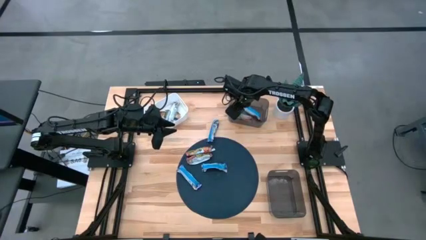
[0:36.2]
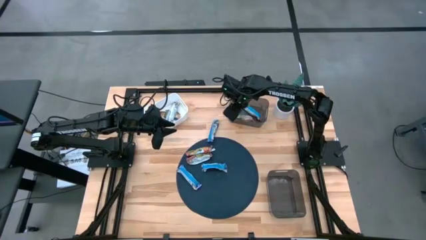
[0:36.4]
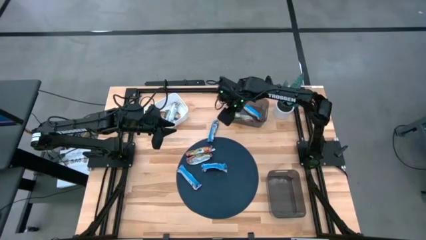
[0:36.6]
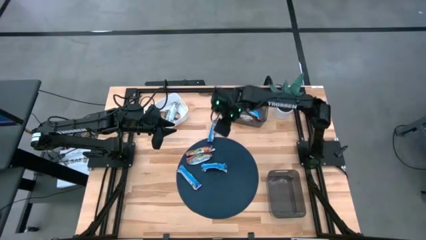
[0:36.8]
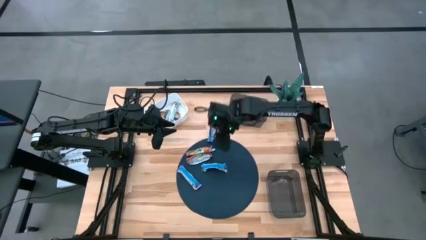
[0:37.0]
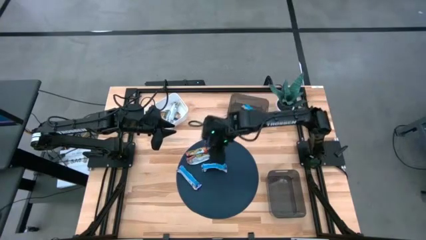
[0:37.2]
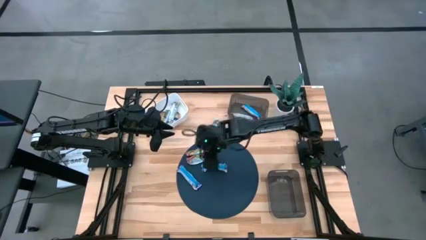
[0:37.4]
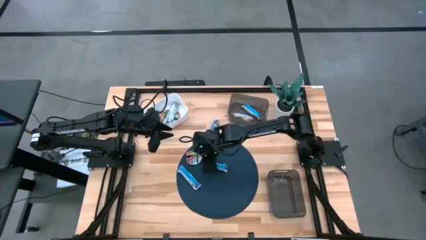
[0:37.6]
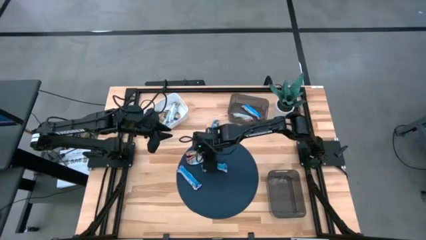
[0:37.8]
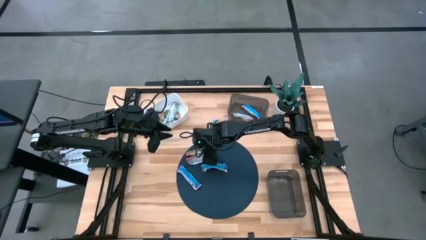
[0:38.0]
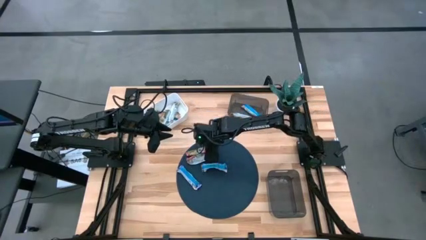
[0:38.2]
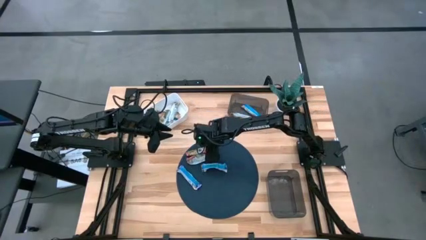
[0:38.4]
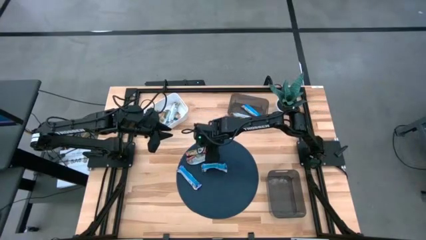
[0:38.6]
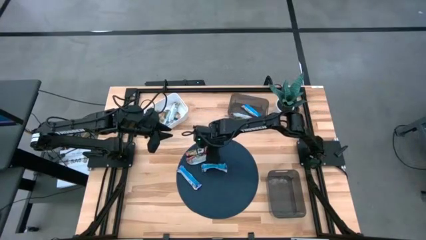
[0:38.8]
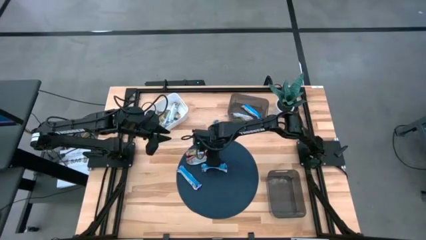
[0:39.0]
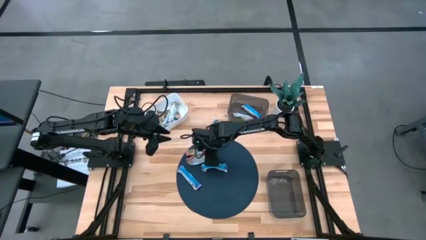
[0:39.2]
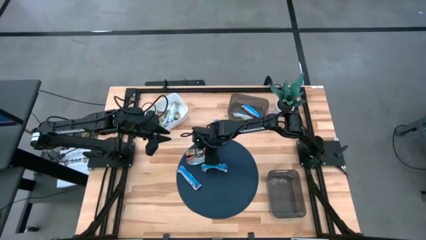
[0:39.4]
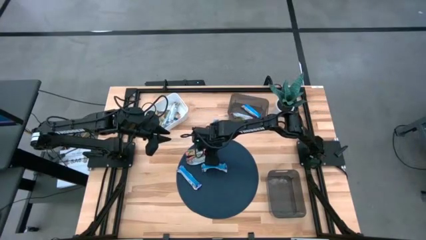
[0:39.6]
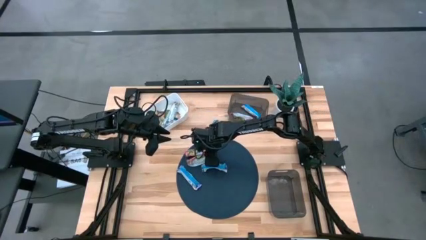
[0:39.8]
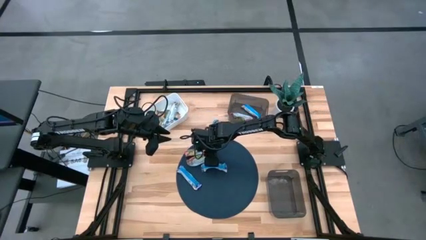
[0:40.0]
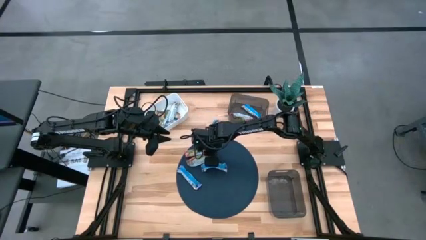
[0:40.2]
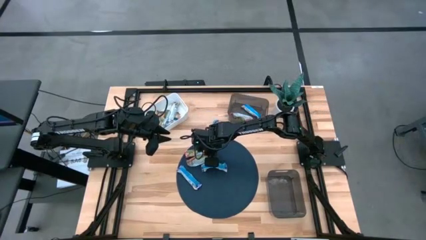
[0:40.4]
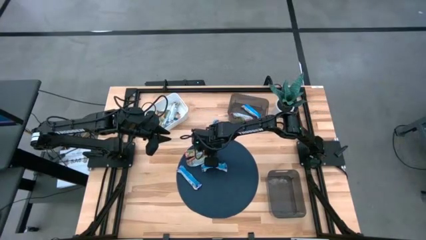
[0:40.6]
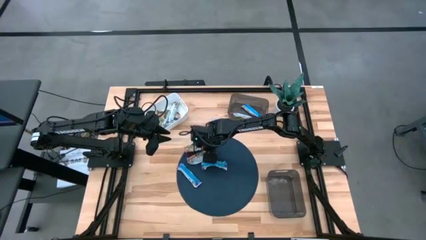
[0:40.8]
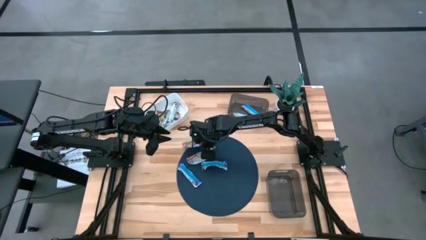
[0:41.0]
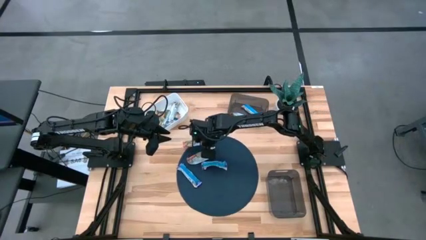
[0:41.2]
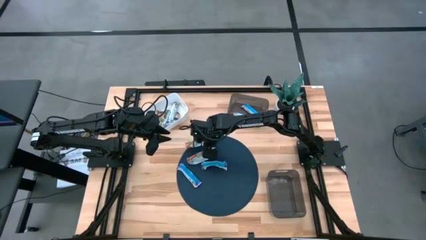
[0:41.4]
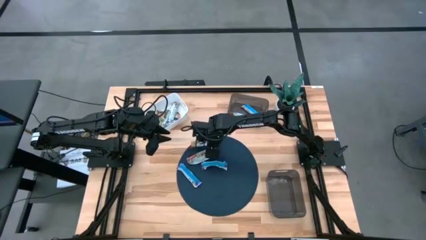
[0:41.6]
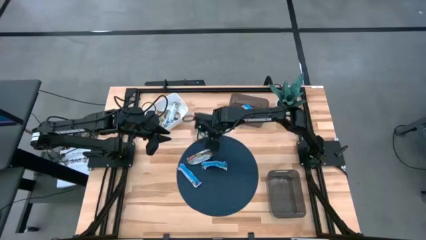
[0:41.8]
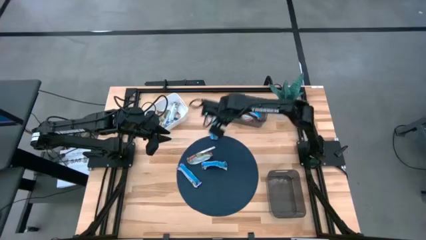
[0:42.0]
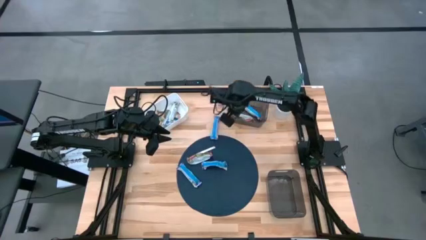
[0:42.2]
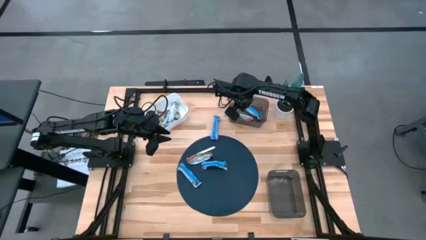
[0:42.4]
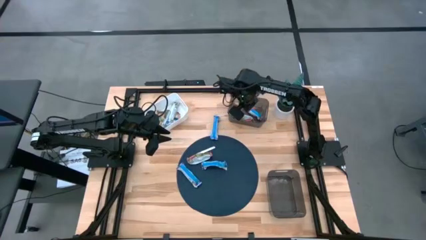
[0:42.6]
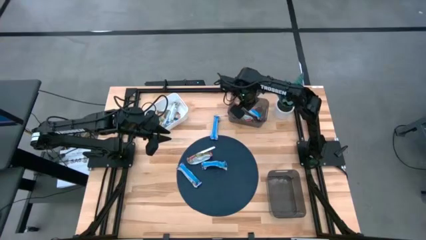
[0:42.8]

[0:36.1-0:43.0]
Task: Pick and place Granola Bars by type
Put the red granola bar into the top black bin

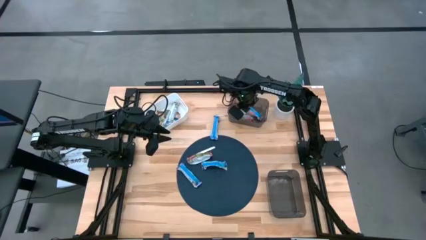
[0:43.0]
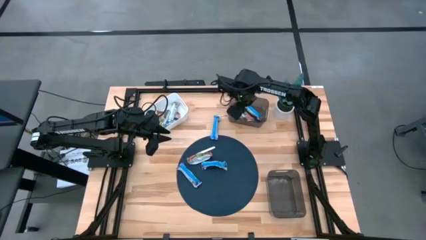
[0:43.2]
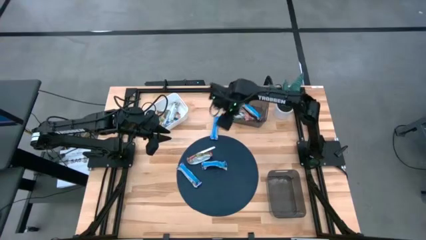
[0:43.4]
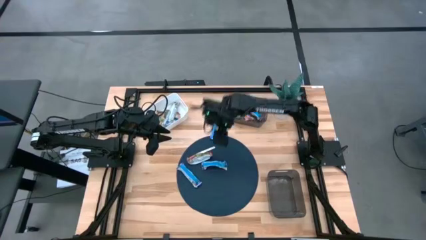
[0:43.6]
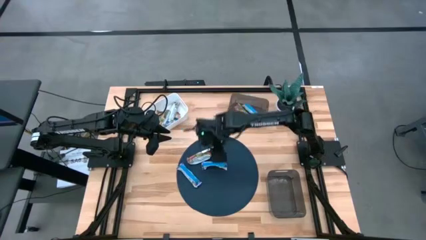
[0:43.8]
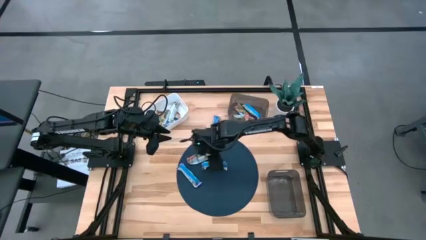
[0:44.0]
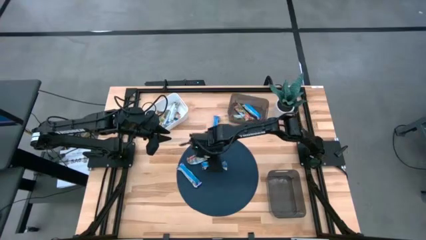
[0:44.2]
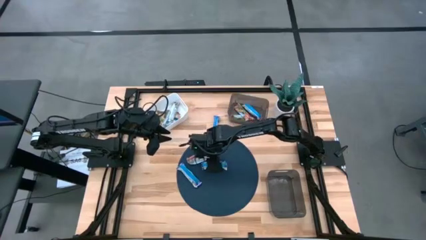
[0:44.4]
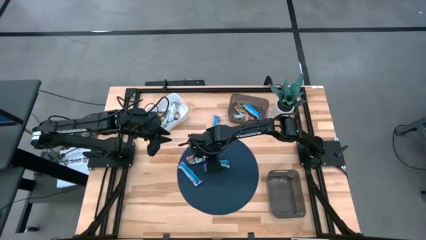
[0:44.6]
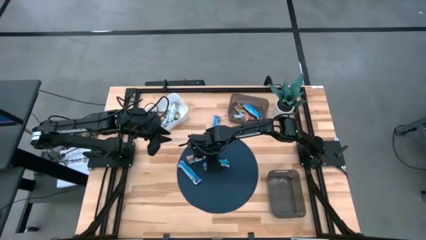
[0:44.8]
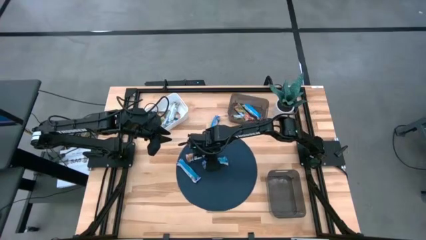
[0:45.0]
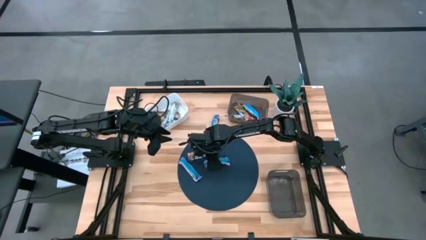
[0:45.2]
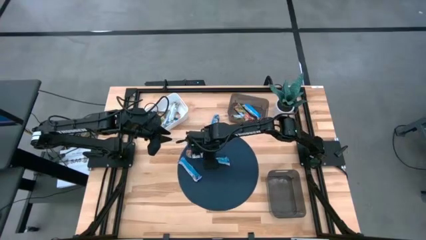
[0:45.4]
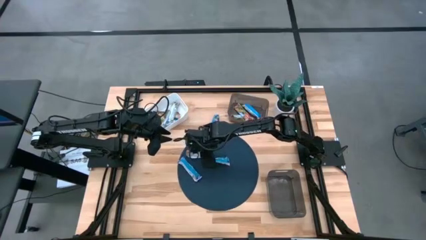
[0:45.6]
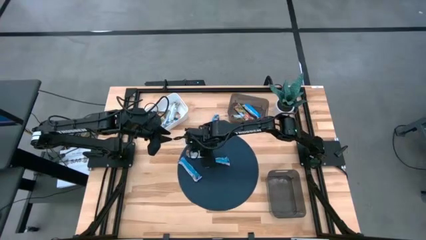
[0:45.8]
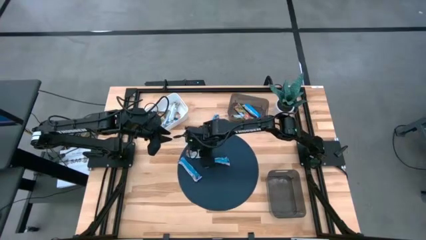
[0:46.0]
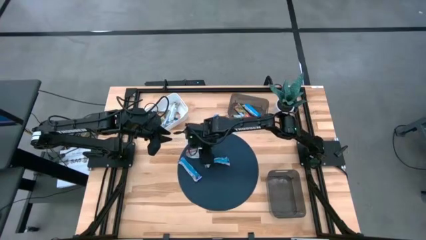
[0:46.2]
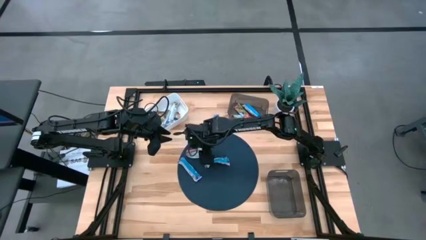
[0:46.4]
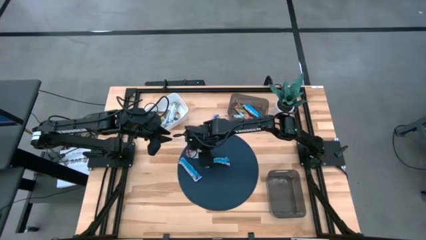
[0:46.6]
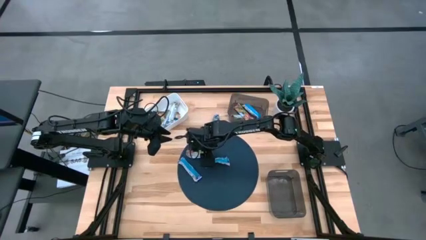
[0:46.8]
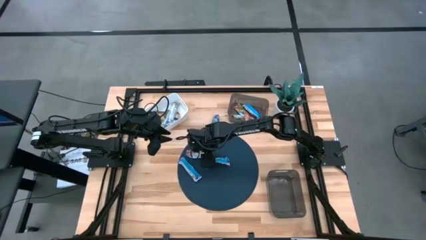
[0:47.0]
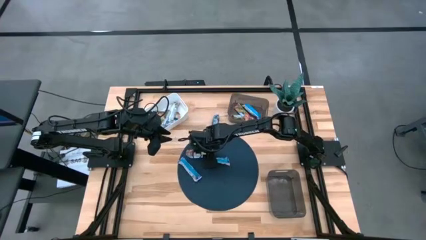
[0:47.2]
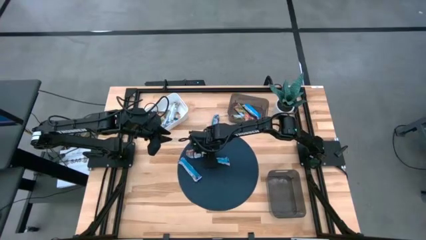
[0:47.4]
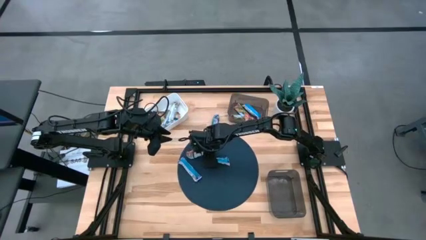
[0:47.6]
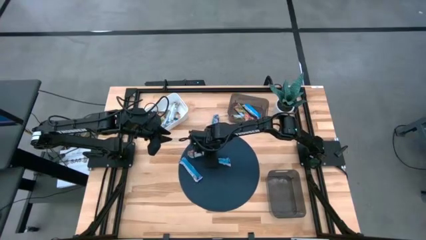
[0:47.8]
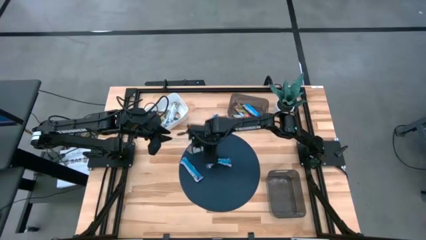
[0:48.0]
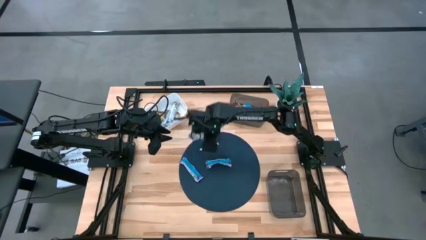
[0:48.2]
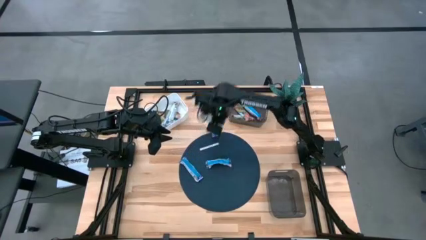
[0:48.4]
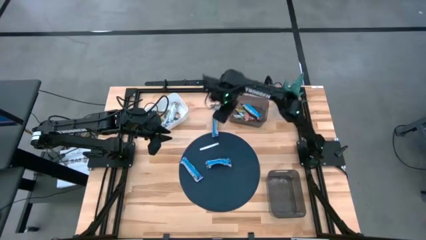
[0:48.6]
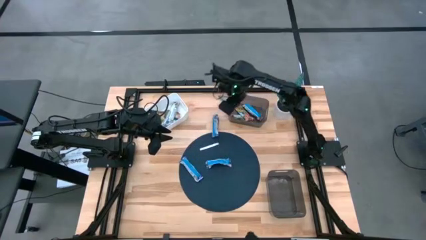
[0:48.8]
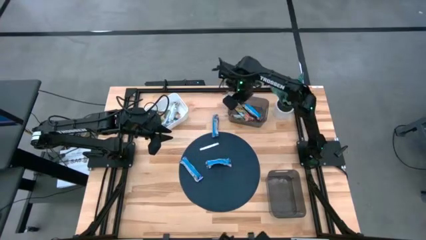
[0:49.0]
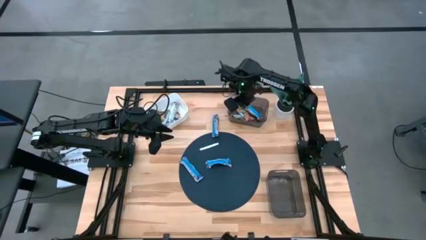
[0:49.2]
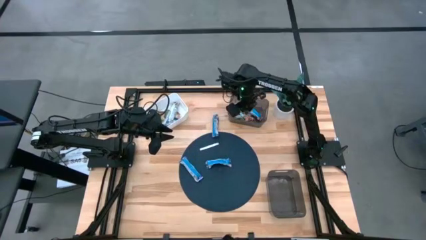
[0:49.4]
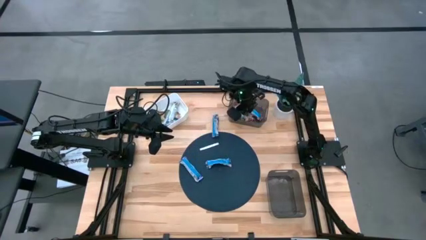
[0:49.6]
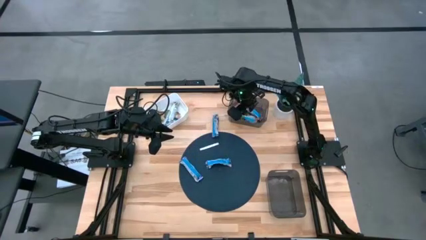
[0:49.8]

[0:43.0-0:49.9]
Put the red granola bar into the top black bin

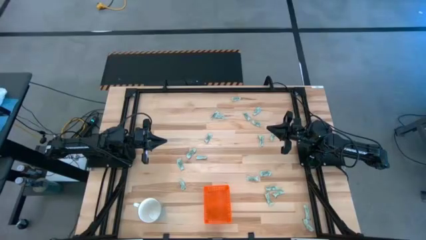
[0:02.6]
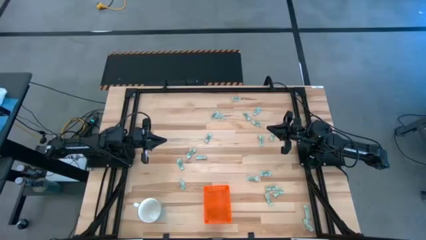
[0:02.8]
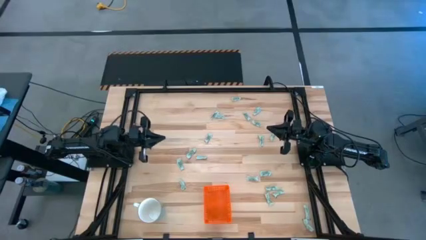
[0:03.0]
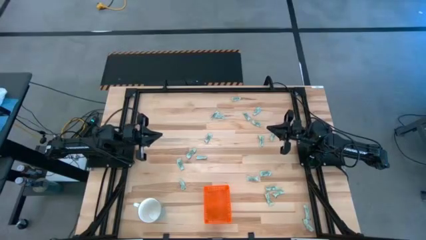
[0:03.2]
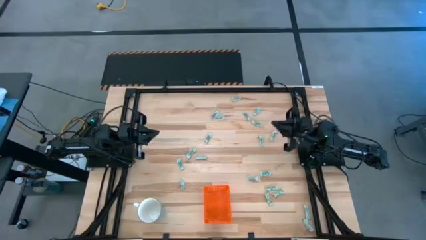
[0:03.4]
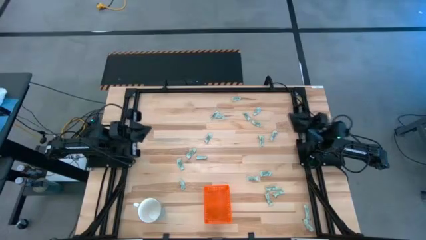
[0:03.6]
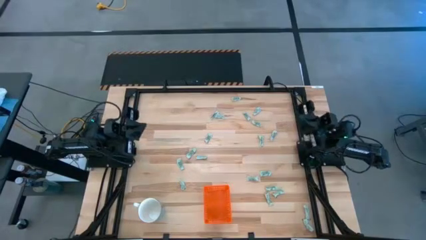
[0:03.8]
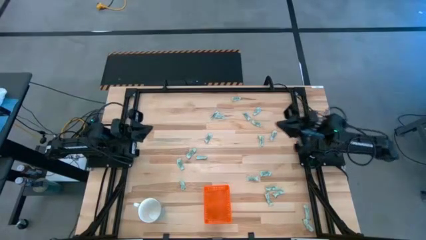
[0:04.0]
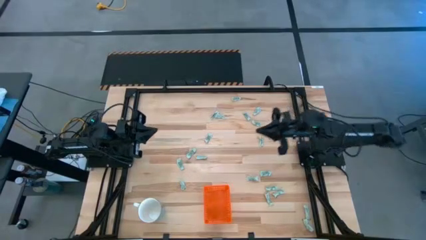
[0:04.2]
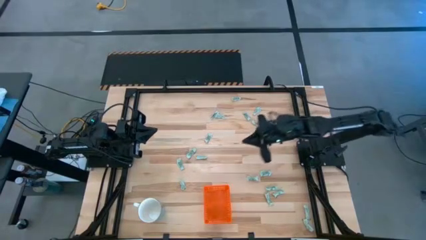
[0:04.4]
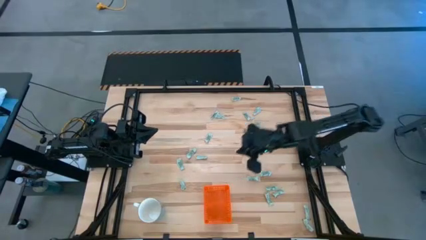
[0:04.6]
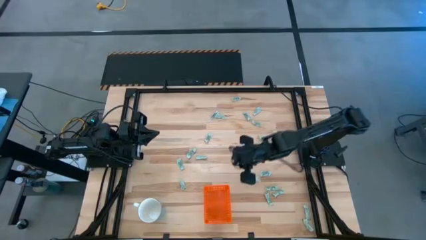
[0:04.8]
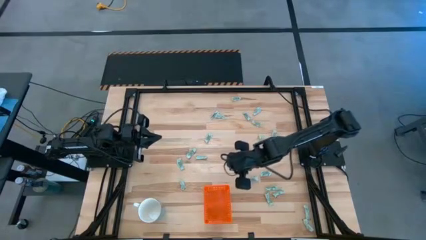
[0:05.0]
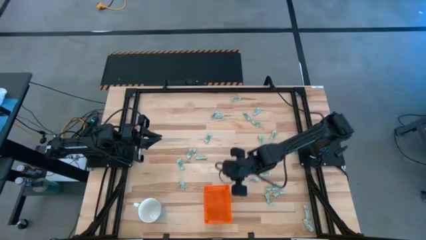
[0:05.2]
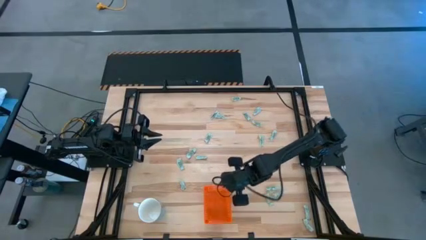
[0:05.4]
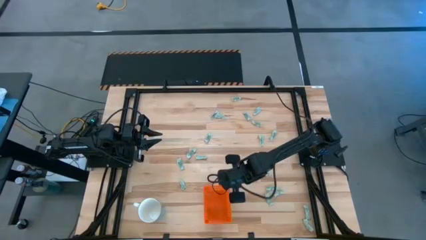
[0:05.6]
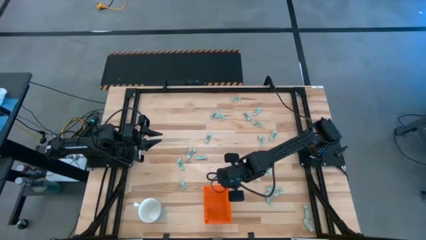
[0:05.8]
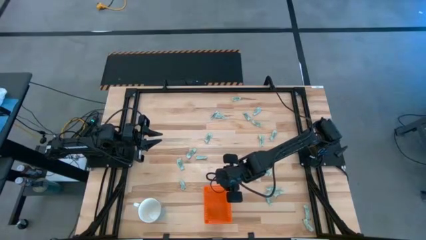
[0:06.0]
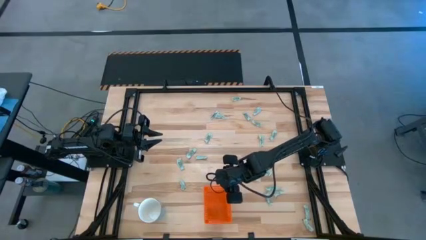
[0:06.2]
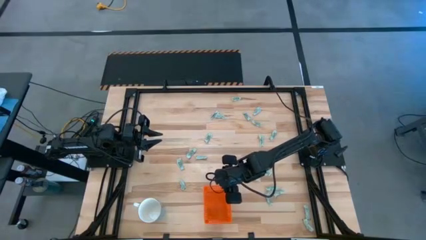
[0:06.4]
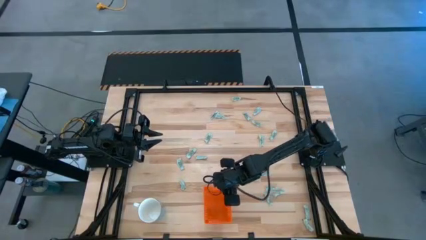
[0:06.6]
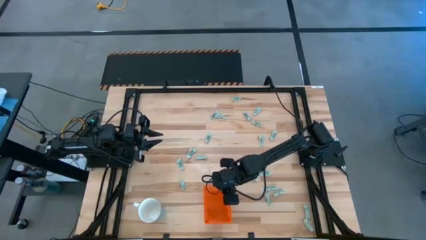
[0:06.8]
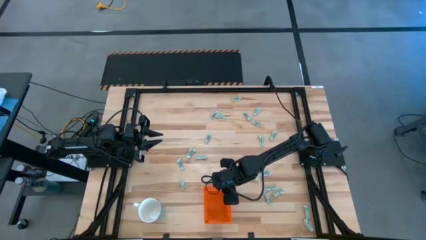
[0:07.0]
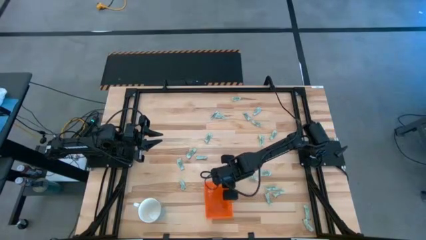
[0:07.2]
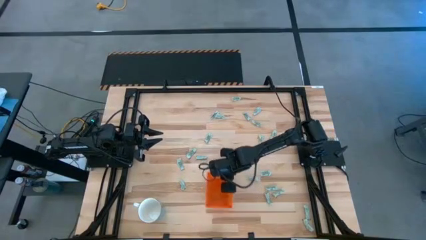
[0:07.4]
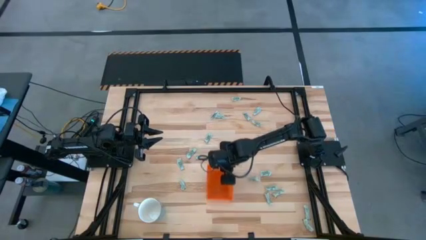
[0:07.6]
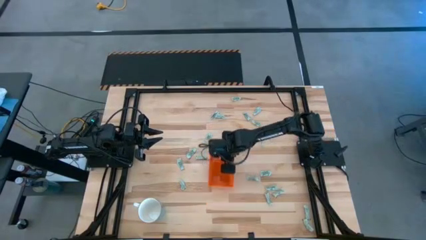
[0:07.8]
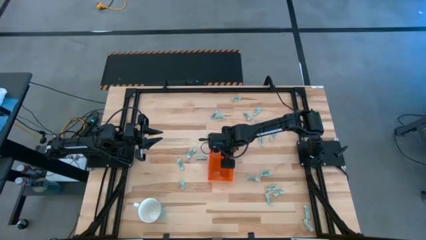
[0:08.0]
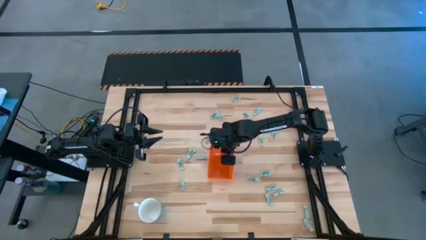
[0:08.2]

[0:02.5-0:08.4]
Task: Pick and place Stevia / Truvia into bins
Move the orange bin to the center of the table
